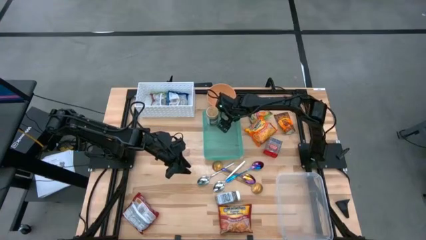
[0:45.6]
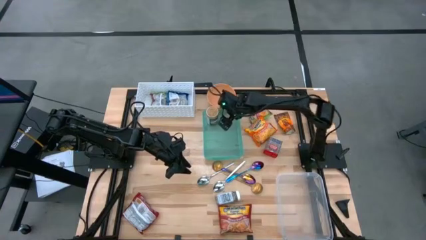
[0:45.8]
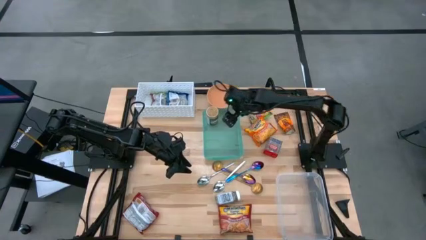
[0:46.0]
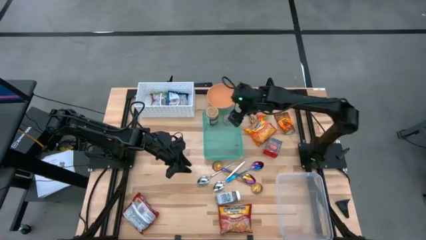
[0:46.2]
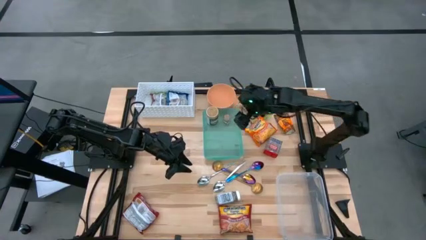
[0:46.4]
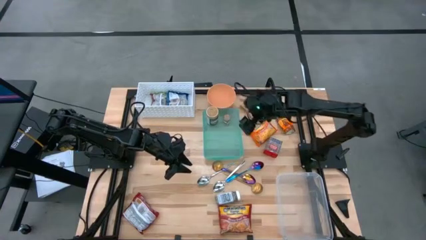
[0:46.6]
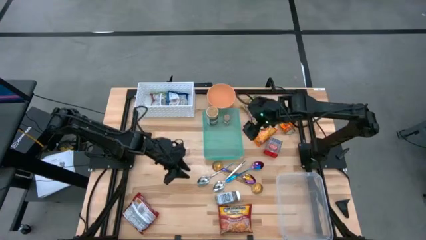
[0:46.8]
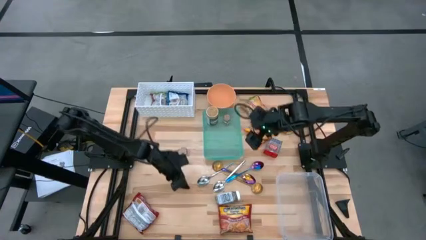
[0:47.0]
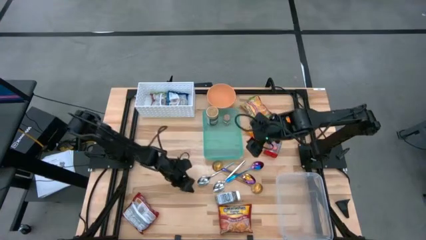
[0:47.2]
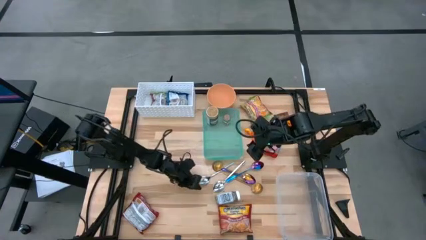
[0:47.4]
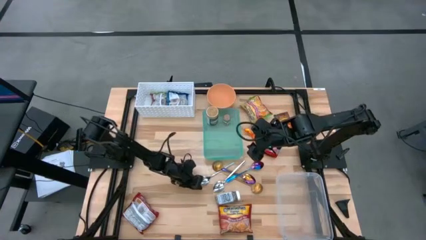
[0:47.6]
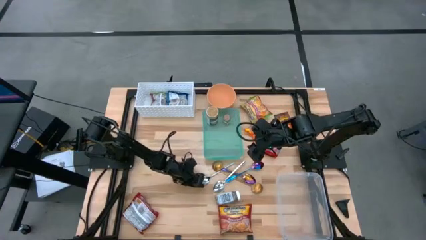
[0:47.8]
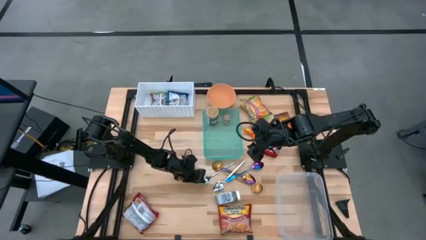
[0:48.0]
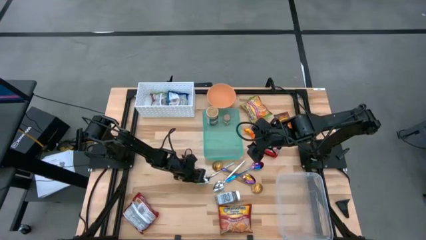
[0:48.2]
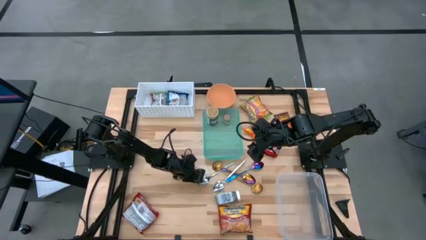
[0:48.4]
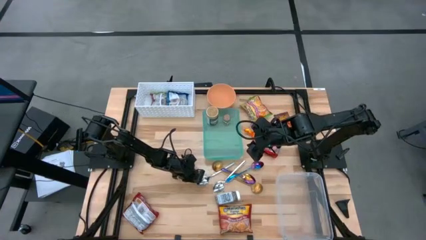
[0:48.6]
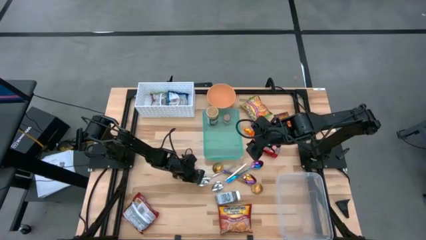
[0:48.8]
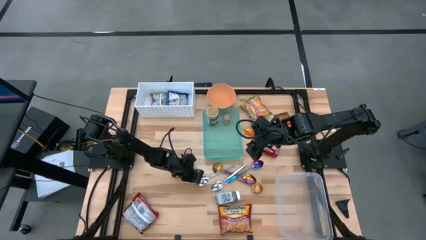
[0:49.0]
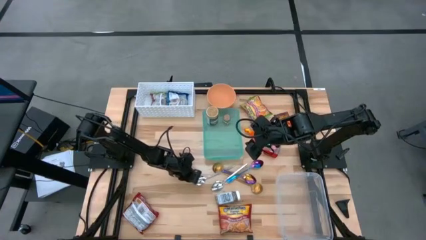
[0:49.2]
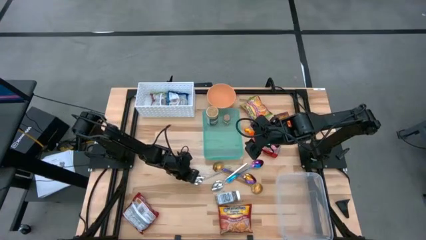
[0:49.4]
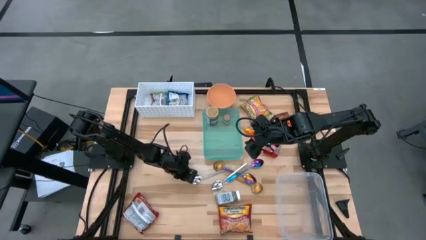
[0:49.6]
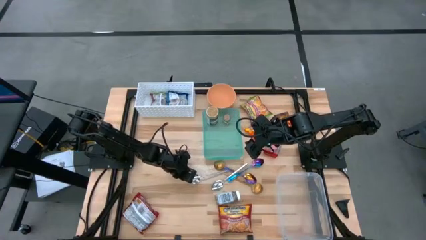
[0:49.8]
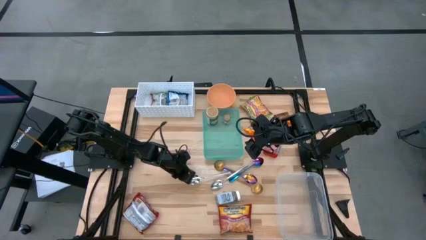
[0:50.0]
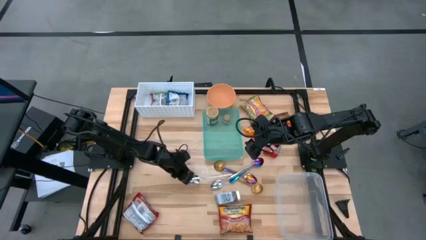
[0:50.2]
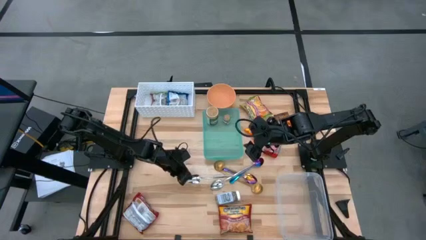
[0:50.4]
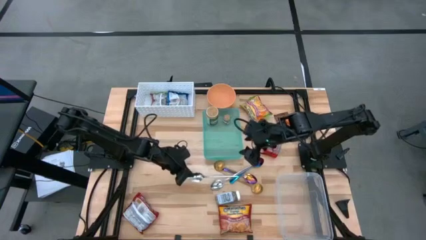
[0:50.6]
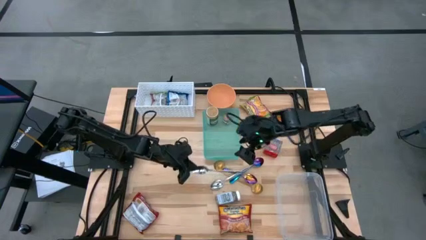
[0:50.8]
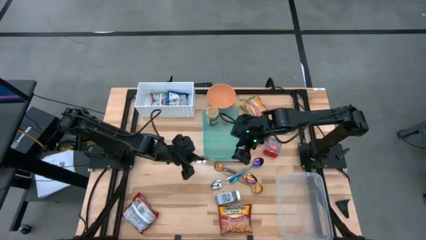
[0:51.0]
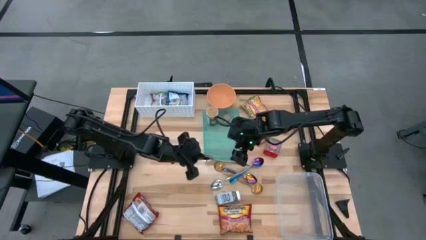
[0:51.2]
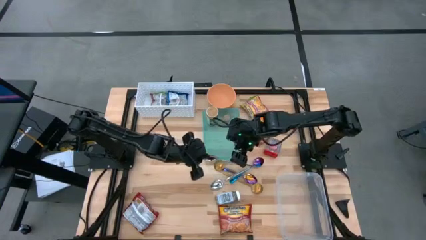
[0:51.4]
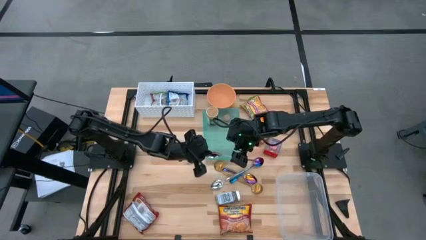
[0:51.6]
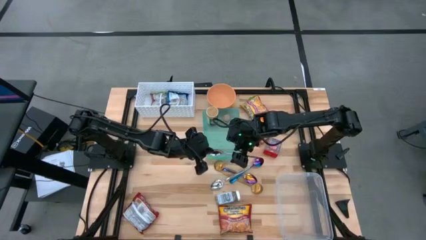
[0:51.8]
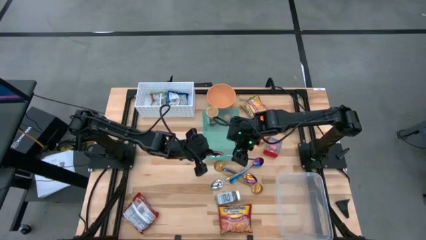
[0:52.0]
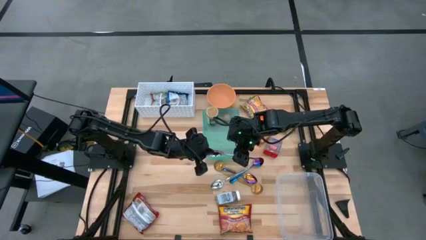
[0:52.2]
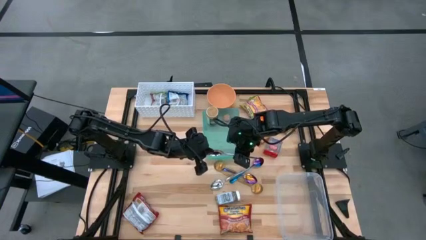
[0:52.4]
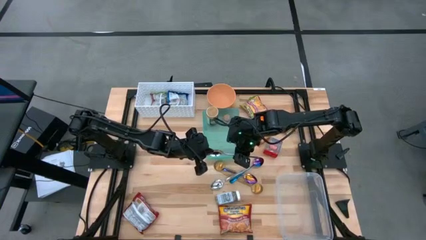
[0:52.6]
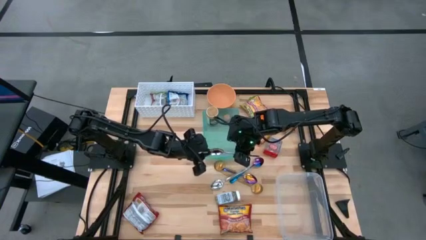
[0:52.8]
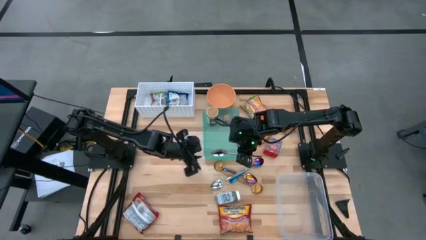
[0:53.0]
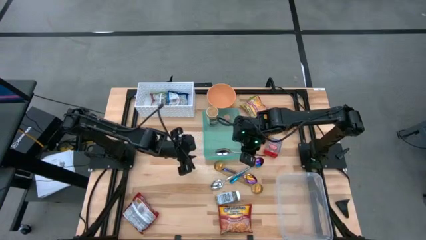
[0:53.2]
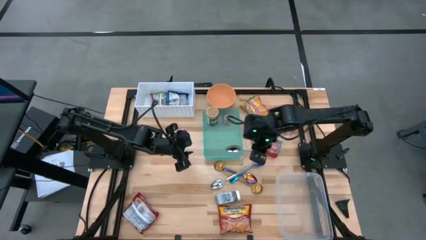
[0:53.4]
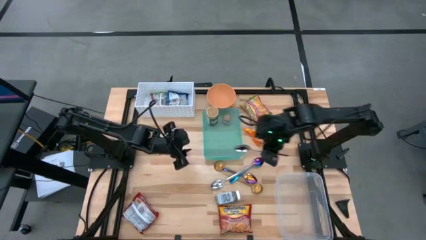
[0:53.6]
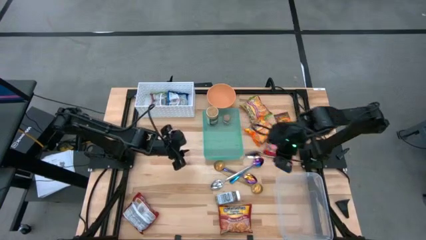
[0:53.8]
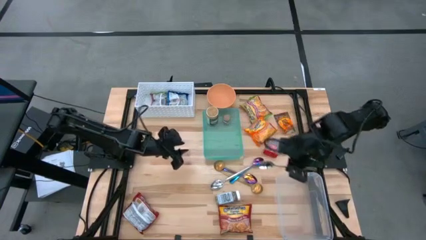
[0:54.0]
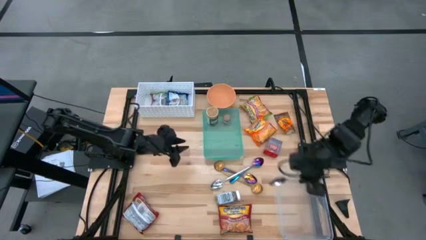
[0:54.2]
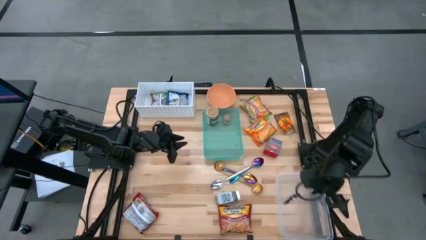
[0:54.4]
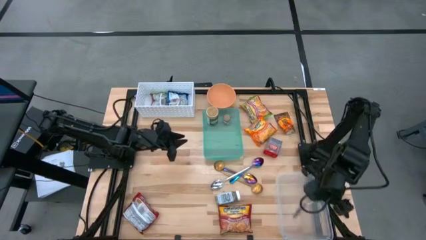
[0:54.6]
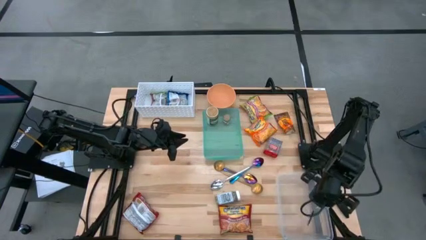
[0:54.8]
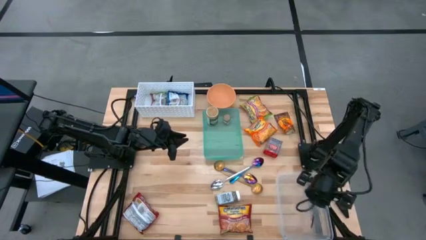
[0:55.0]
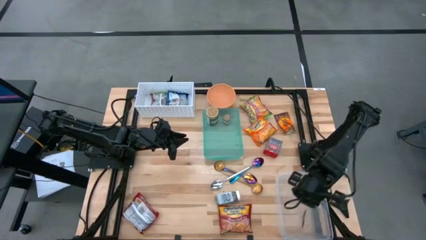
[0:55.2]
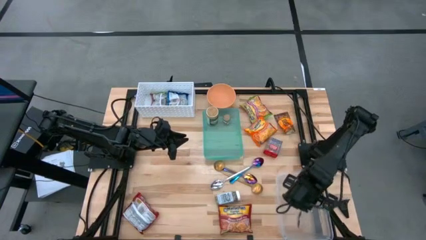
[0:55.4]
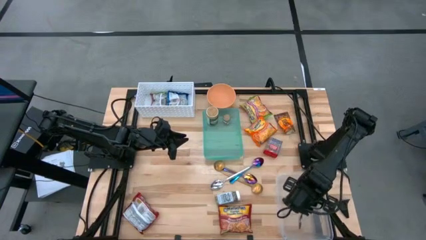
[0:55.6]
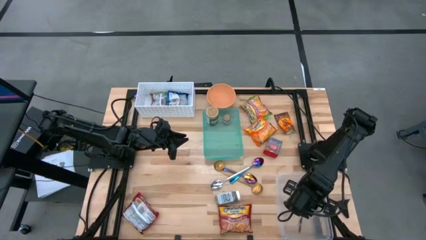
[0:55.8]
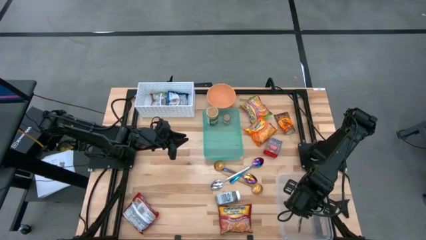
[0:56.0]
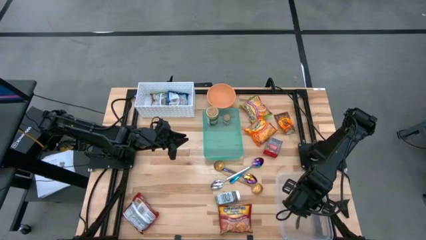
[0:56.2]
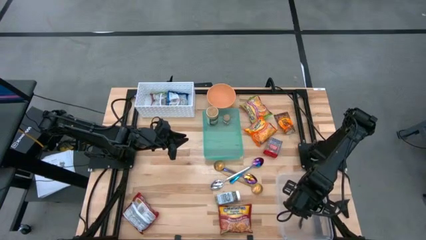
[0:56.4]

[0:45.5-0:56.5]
Task: Pick & Place Food Item
Put the left silver spoon into the transparent bin

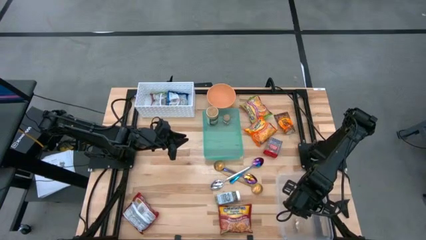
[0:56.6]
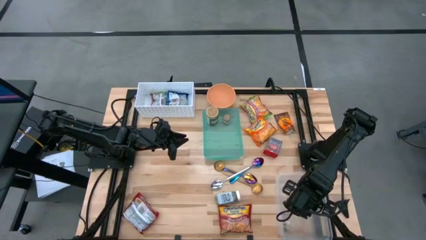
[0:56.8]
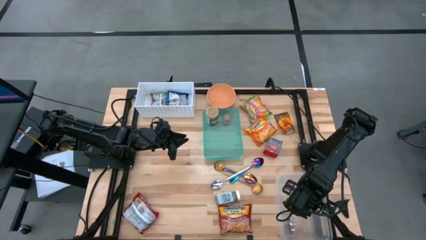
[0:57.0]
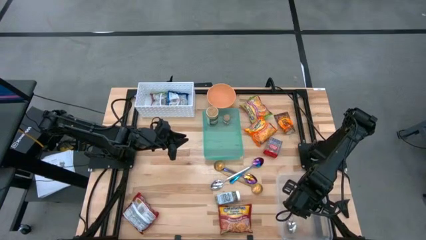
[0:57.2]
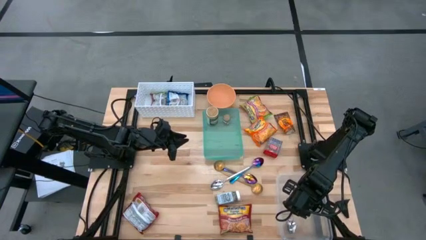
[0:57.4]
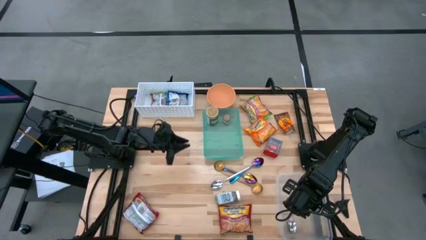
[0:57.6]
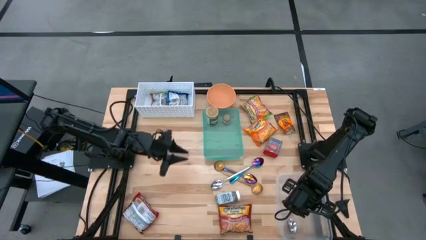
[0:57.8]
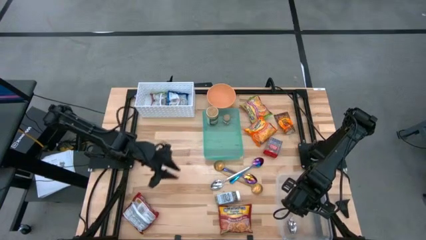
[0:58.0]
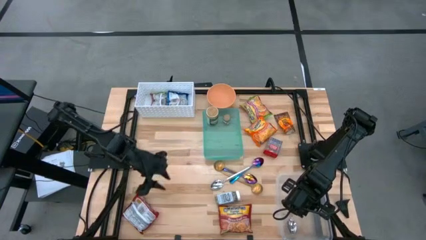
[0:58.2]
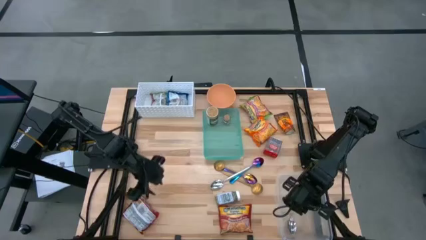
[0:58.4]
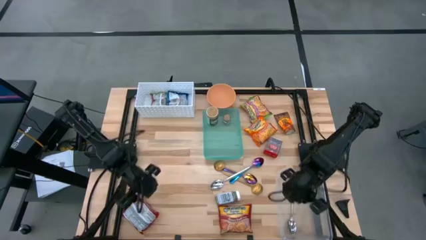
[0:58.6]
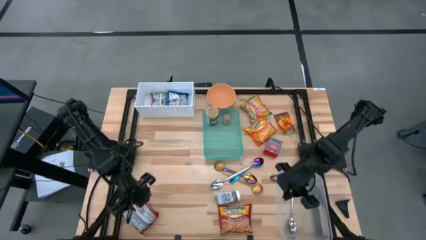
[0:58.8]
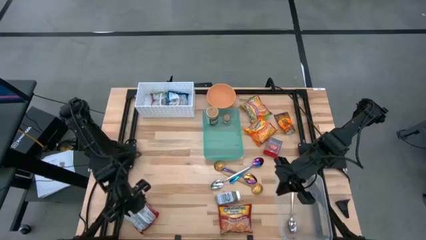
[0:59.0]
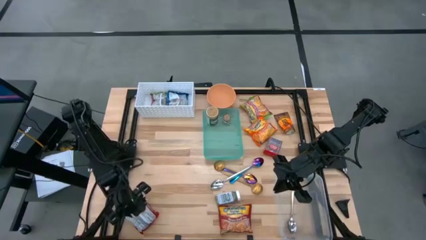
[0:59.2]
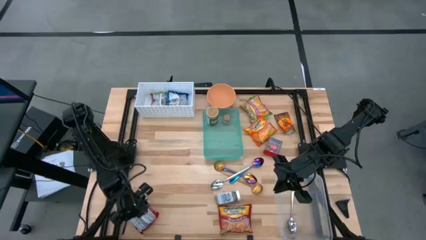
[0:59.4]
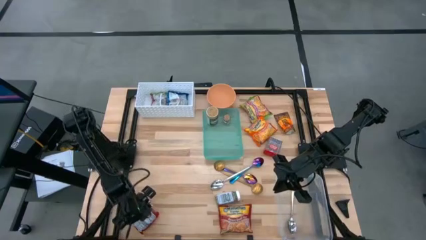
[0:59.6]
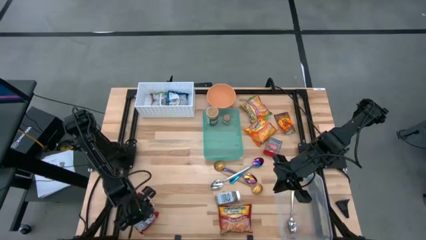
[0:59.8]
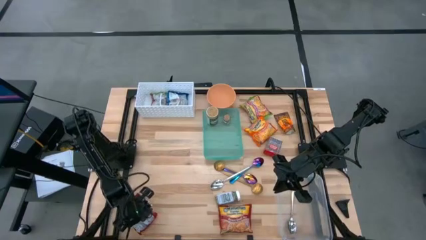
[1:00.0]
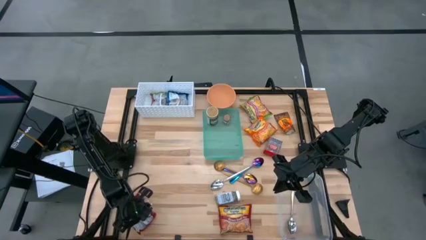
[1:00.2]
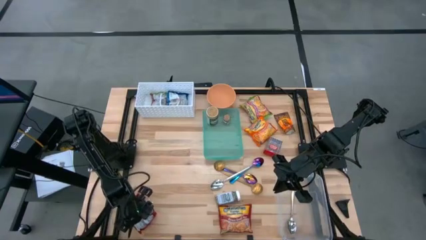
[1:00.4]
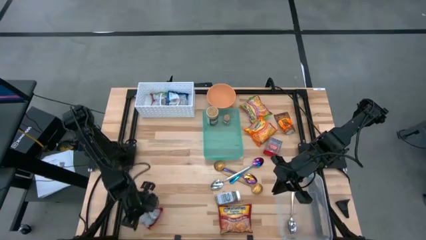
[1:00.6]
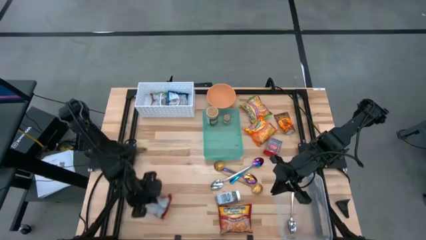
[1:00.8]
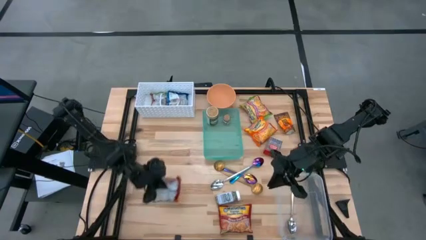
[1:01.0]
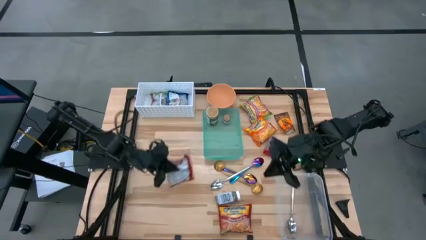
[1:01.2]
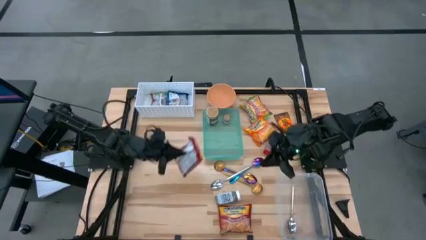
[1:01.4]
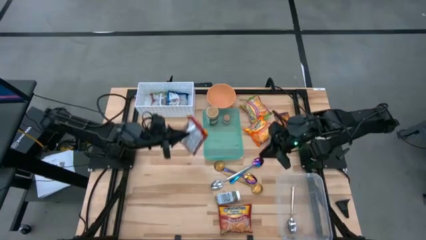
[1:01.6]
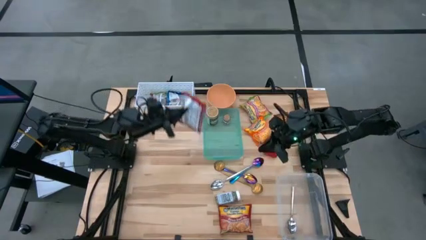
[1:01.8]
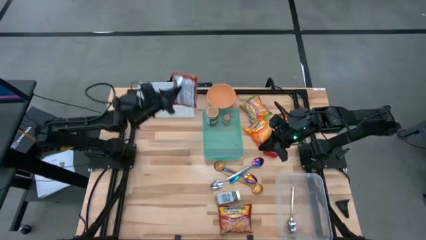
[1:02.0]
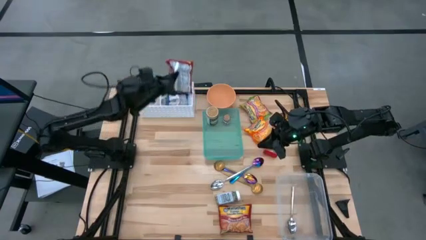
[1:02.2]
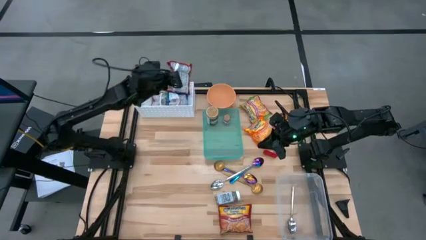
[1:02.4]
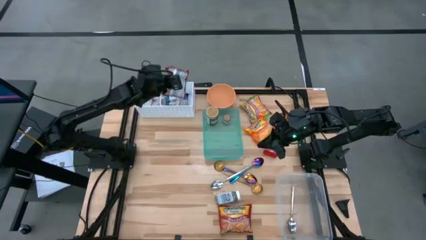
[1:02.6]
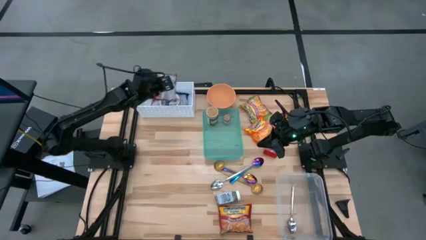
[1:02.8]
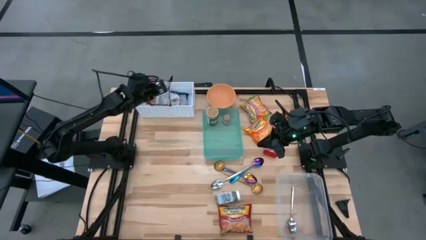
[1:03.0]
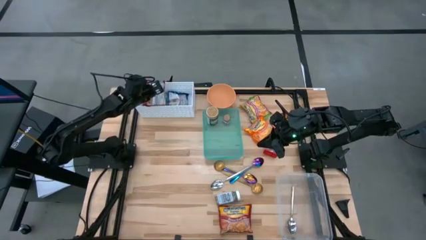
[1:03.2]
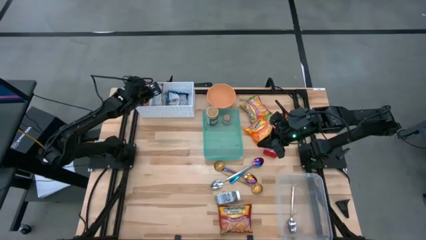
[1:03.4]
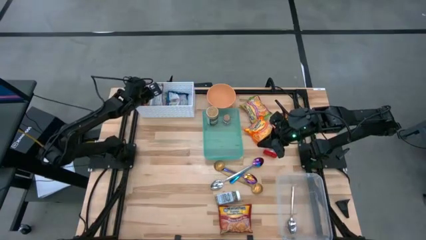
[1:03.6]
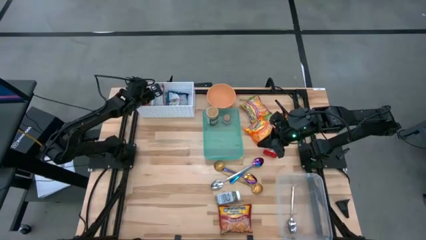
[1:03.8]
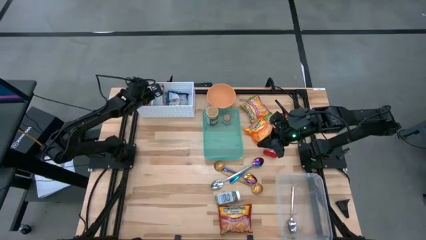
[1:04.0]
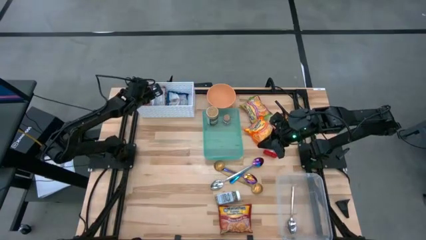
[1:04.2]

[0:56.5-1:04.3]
Put the left red noodles pack into the white bin
